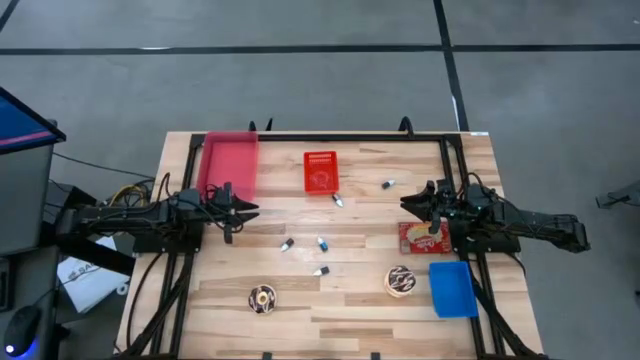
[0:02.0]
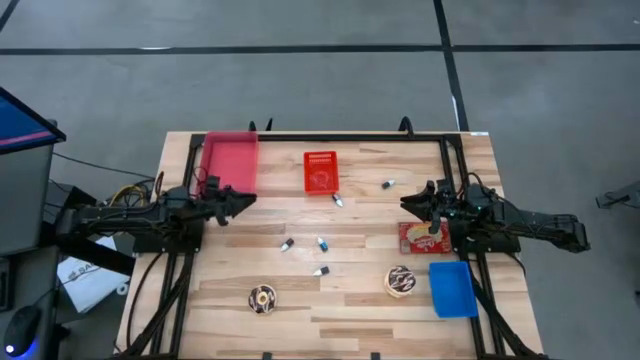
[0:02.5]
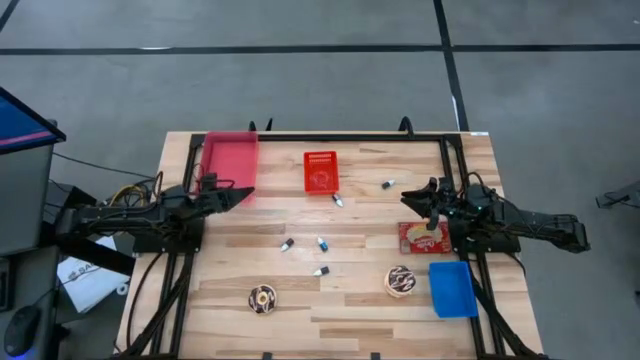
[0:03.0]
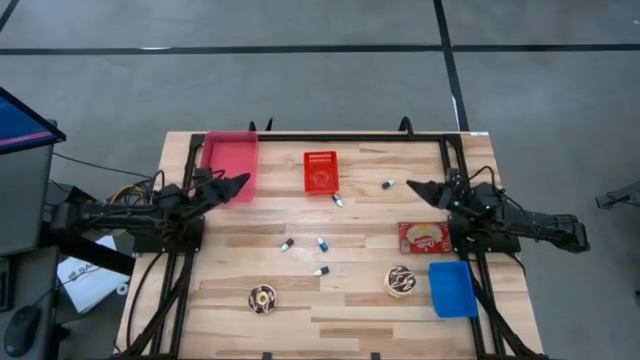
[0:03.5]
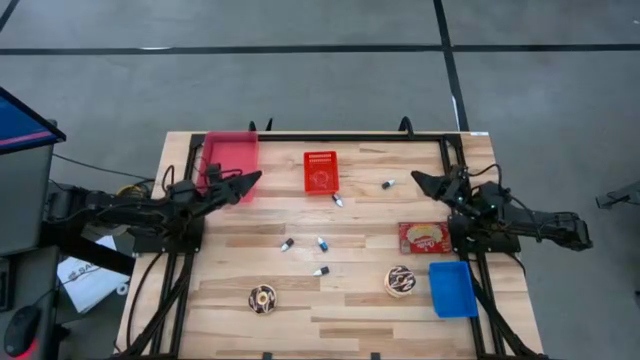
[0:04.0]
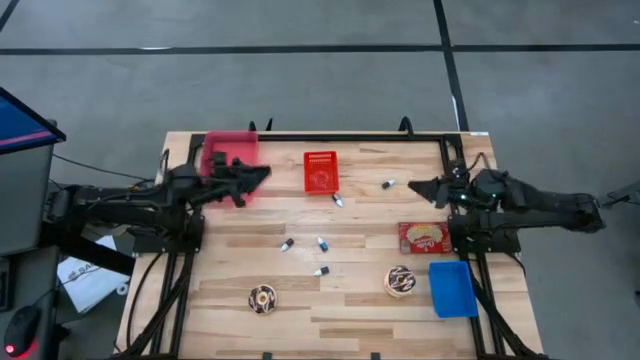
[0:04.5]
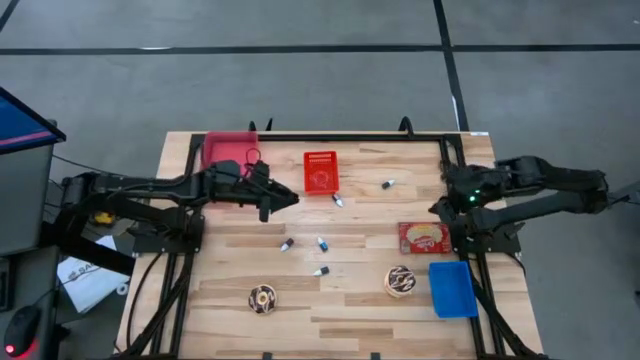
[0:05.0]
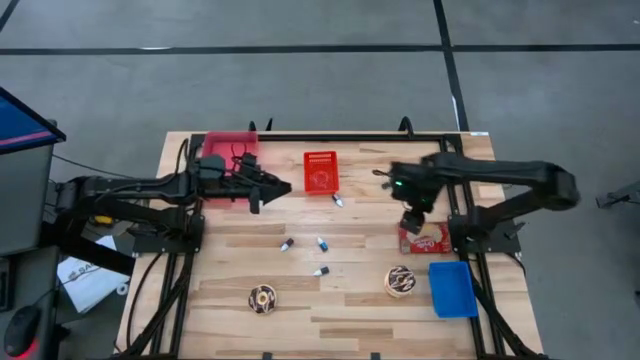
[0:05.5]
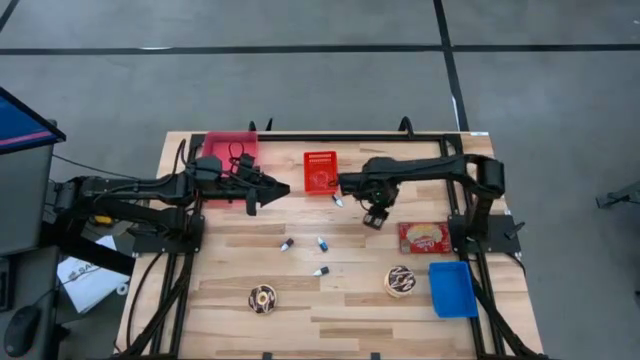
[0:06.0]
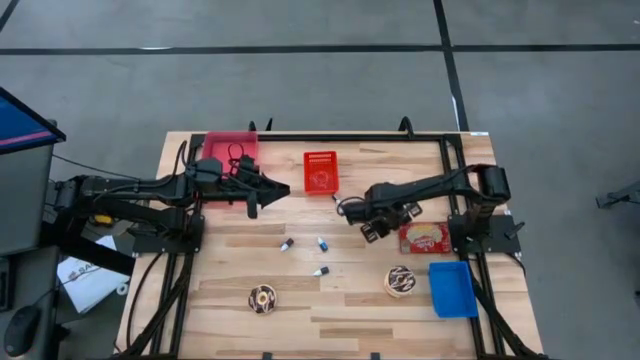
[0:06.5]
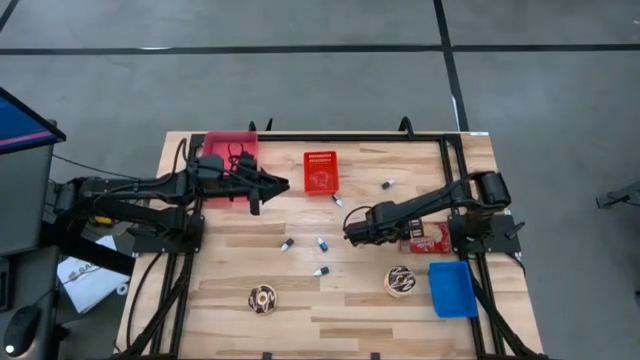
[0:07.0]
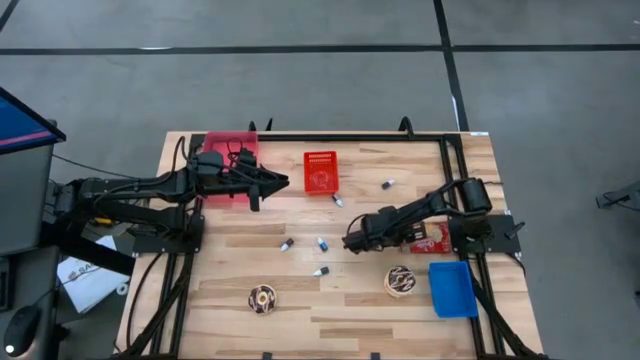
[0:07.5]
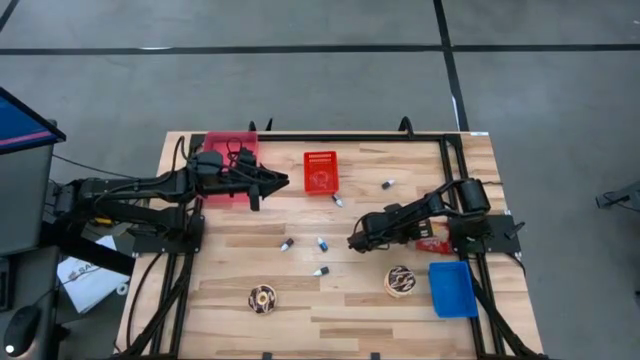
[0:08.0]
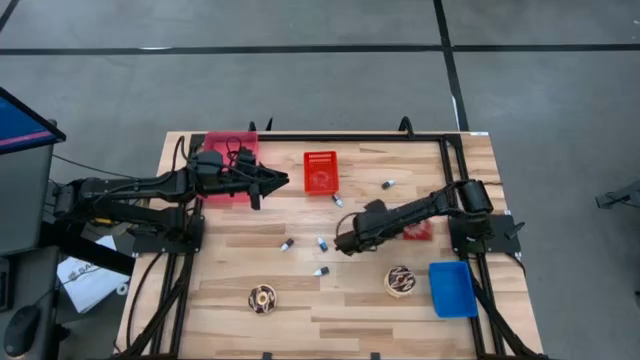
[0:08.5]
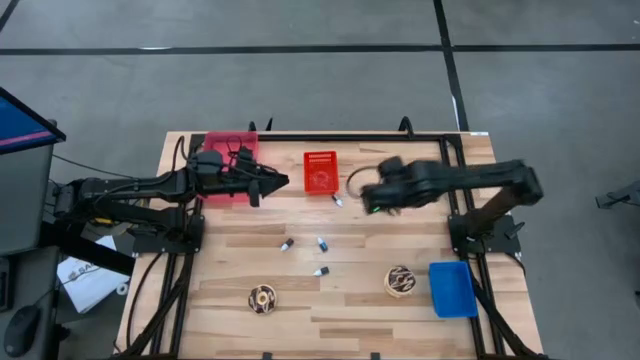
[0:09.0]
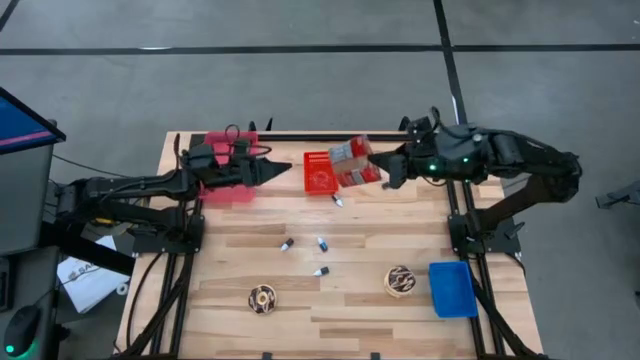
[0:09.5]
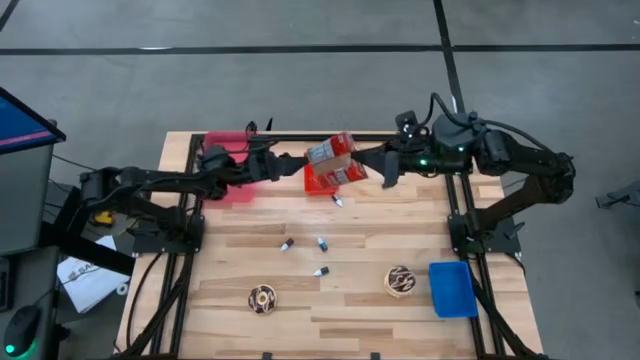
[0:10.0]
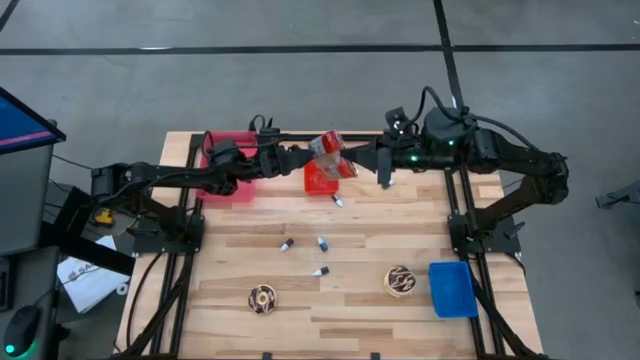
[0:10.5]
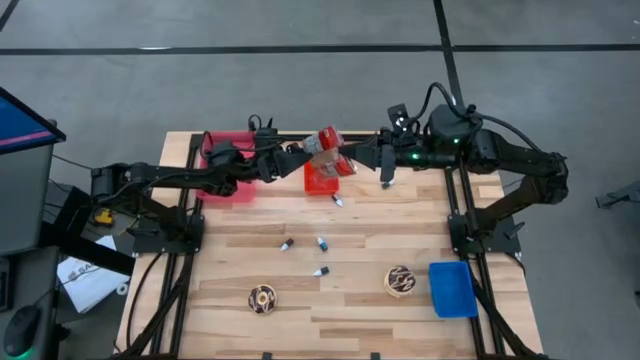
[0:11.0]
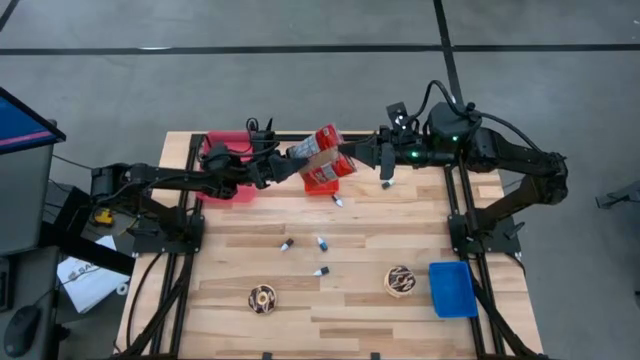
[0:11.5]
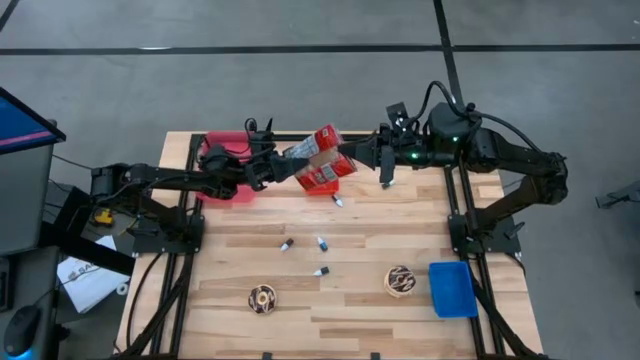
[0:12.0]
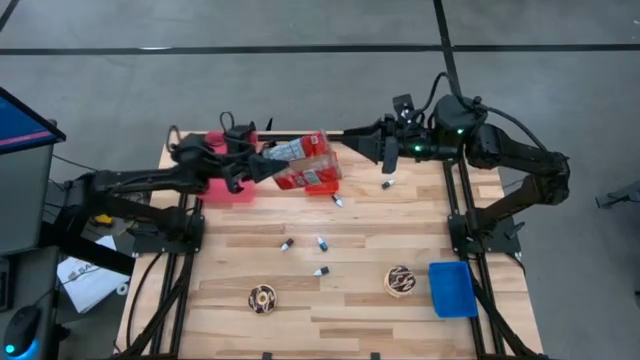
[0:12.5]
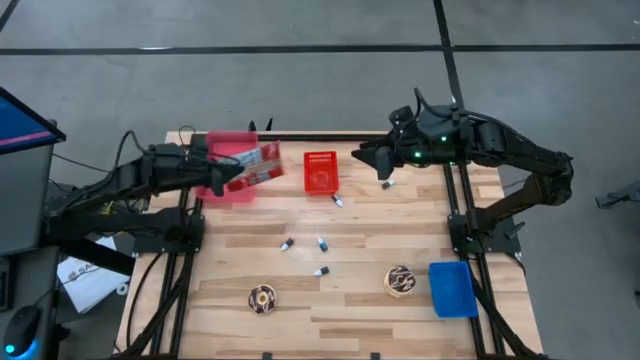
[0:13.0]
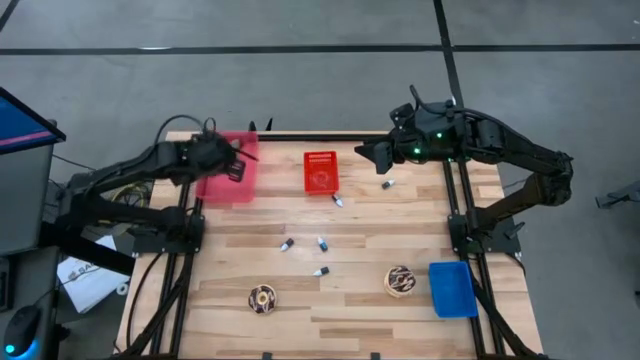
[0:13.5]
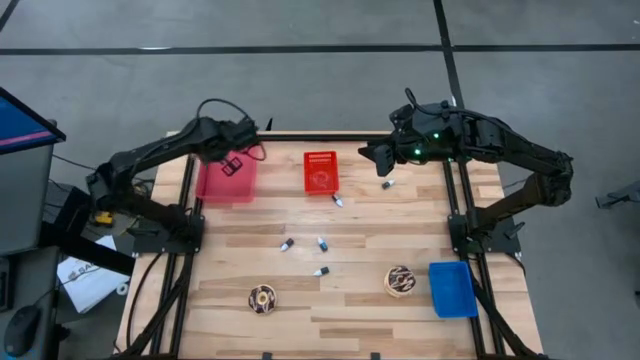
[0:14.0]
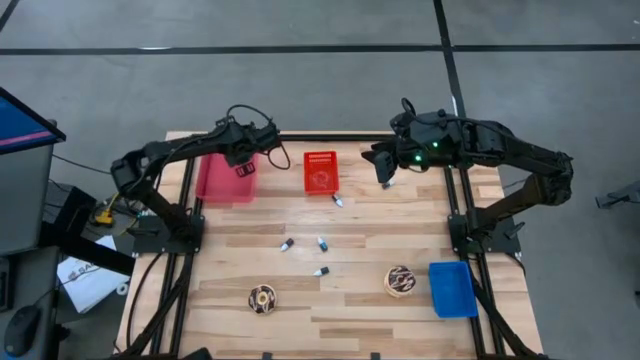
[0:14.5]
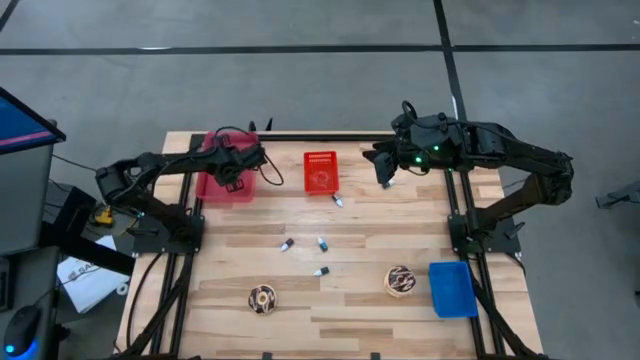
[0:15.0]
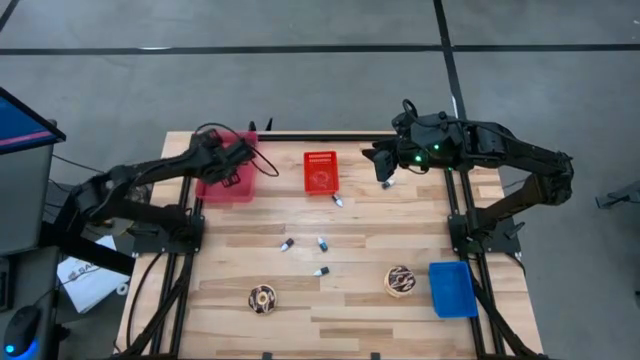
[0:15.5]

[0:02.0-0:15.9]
Put the red popcorn bag into the pink bin

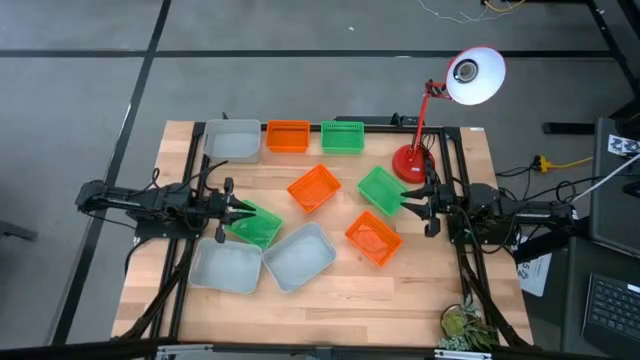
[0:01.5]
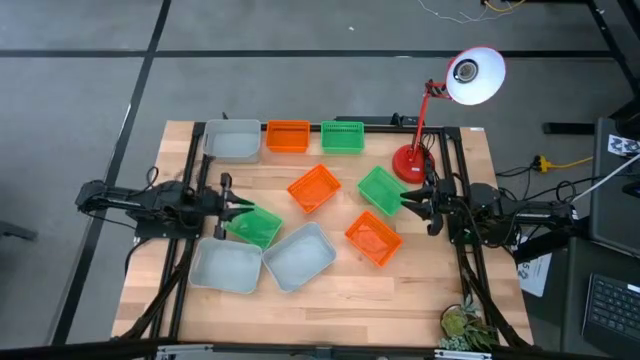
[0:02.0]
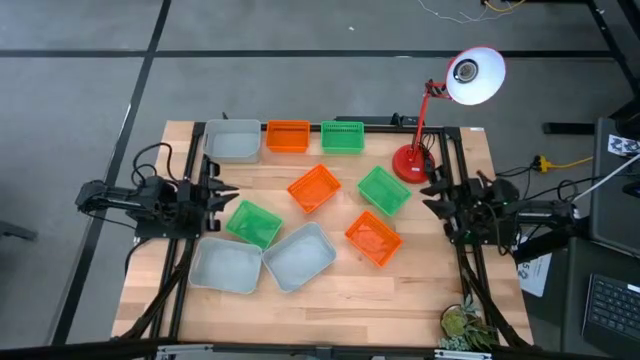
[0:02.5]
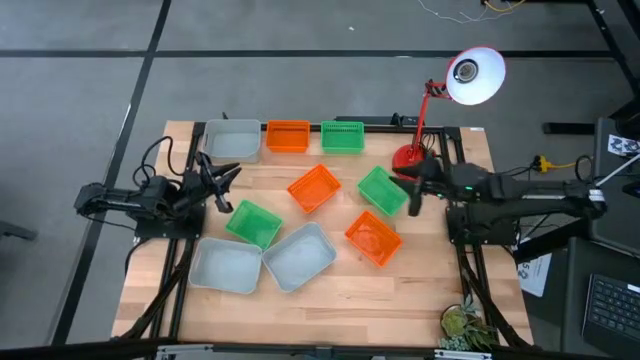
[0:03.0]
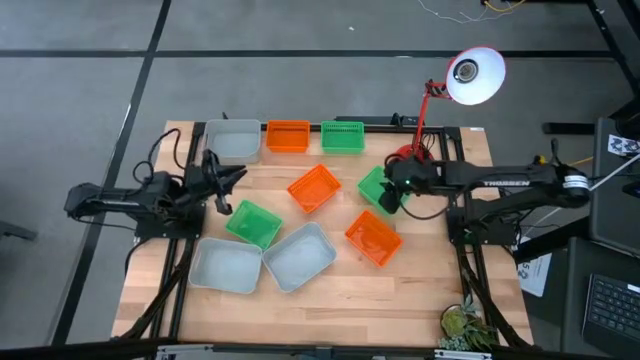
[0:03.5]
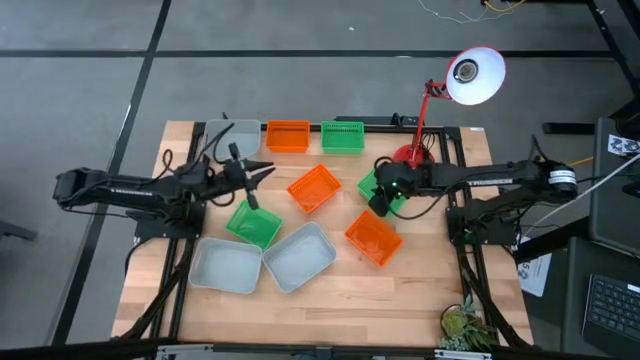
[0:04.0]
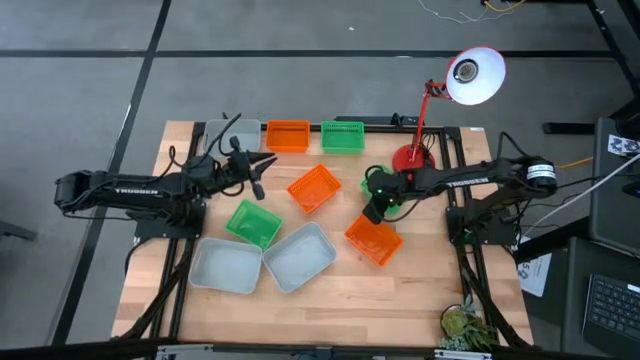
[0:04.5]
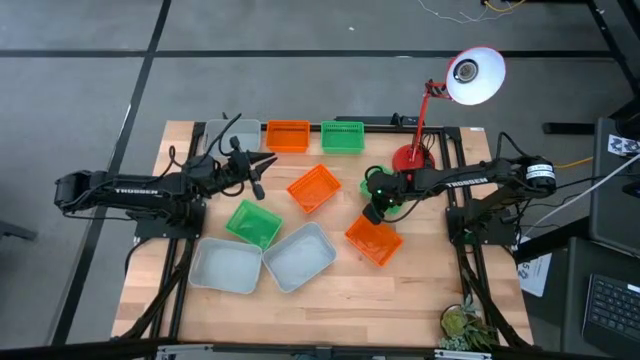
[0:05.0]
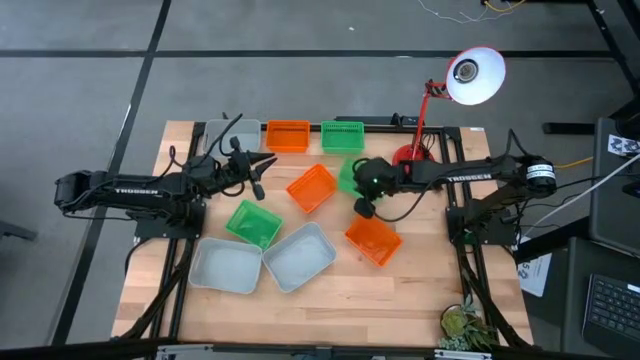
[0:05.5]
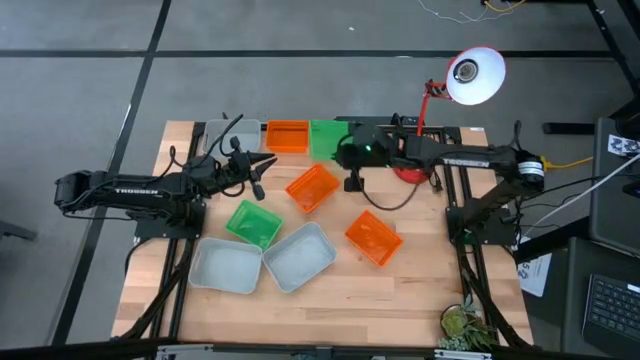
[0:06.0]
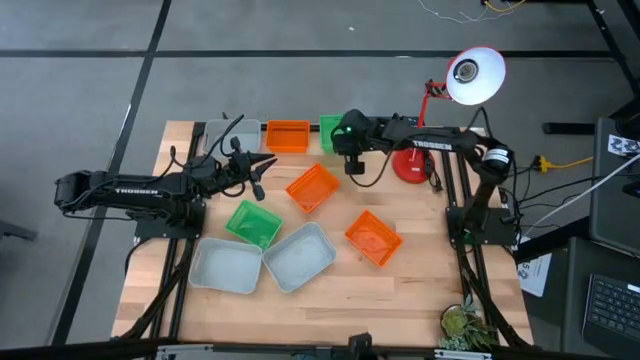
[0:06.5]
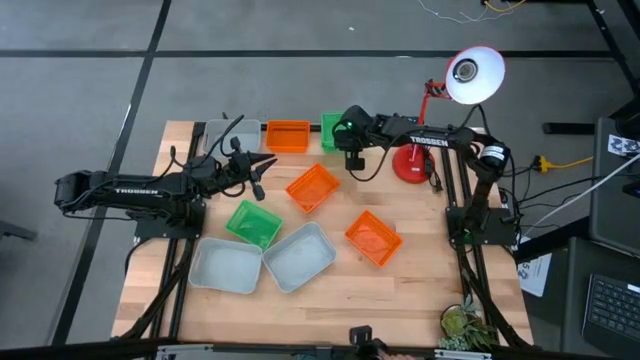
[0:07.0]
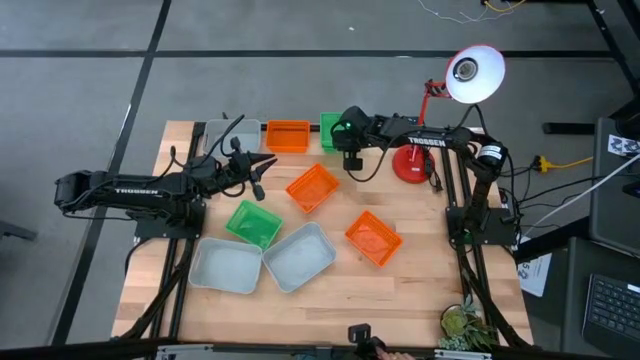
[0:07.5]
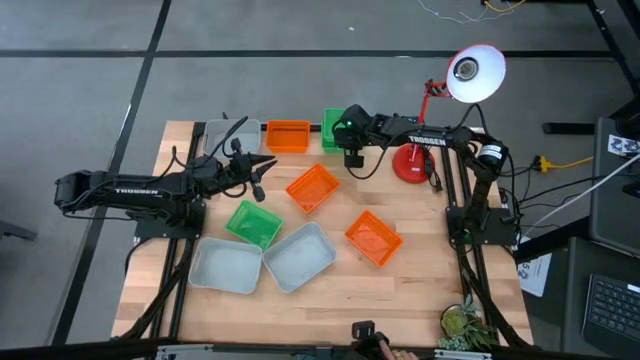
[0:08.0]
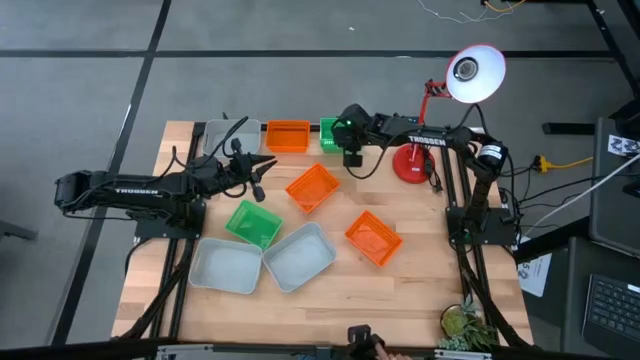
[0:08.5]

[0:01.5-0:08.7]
Stack the right green bin on the top green bin

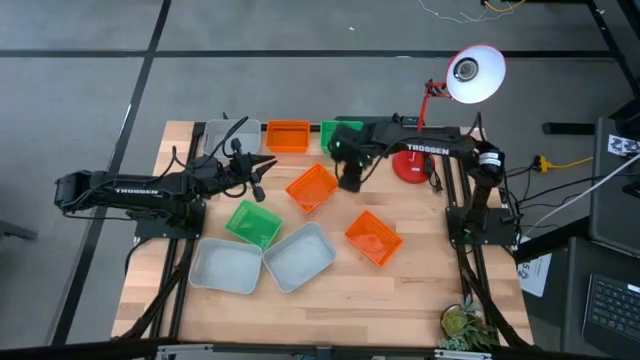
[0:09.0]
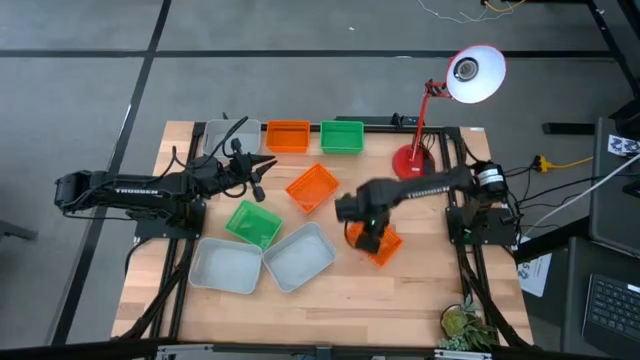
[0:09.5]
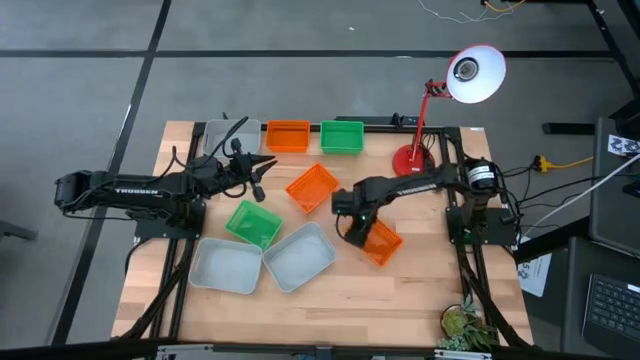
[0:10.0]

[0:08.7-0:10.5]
Move the bottom orange bin to the top of the table
